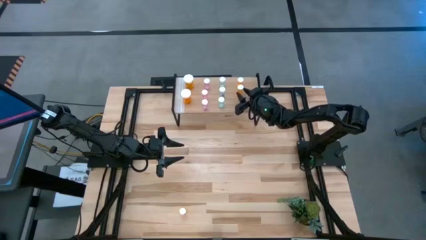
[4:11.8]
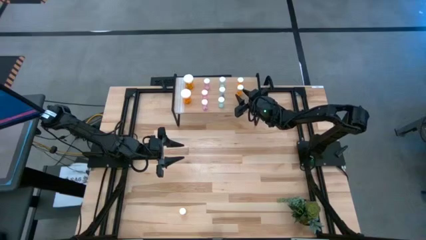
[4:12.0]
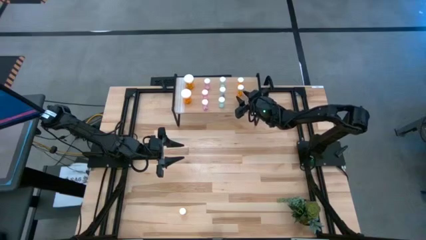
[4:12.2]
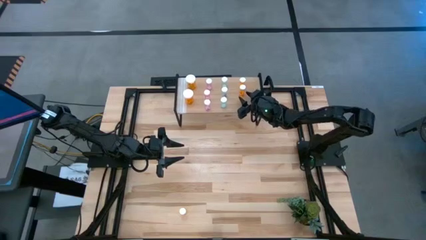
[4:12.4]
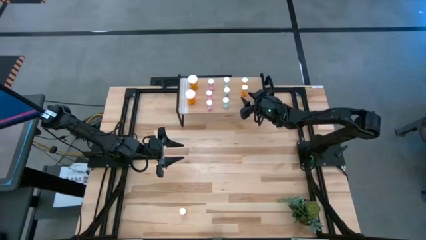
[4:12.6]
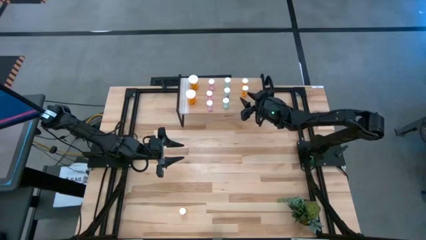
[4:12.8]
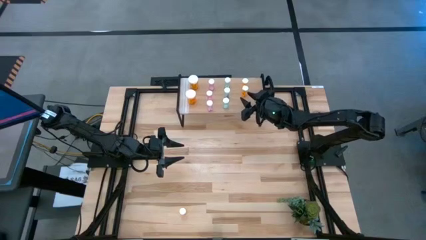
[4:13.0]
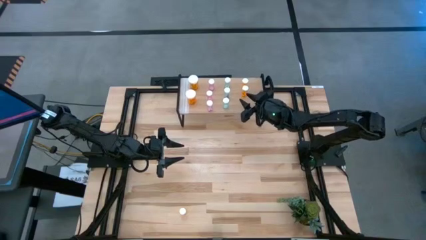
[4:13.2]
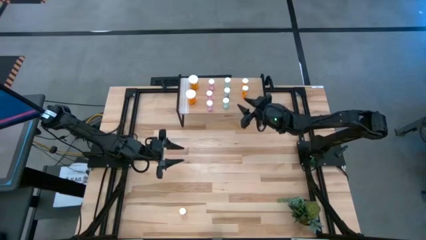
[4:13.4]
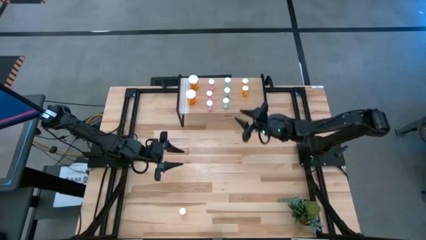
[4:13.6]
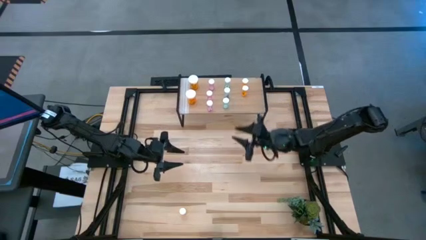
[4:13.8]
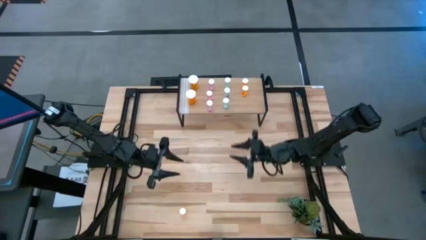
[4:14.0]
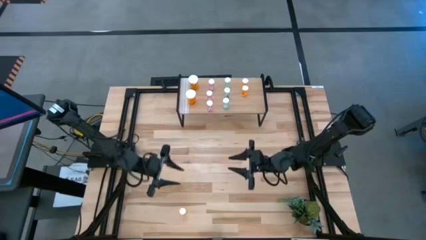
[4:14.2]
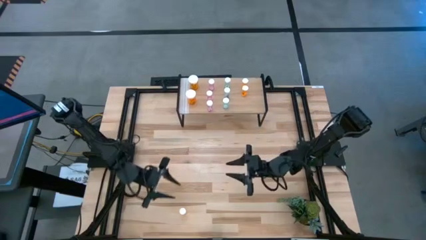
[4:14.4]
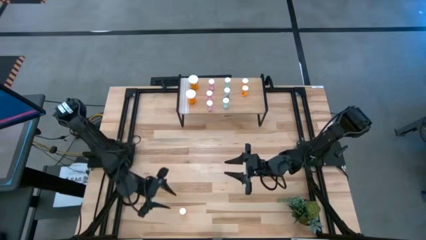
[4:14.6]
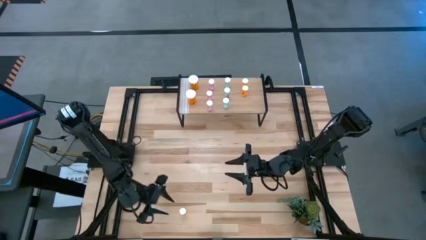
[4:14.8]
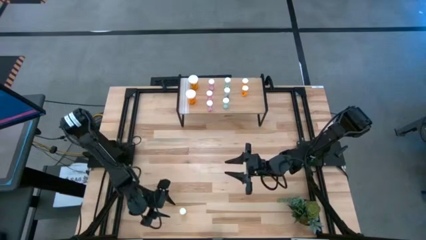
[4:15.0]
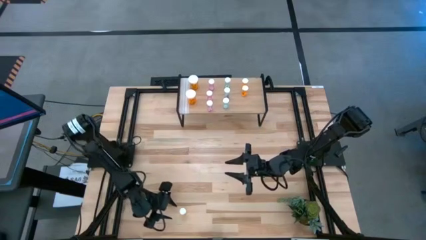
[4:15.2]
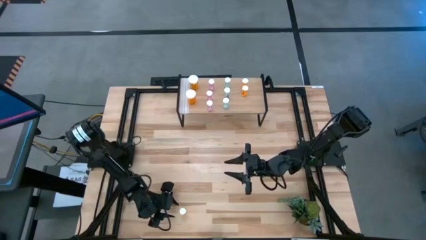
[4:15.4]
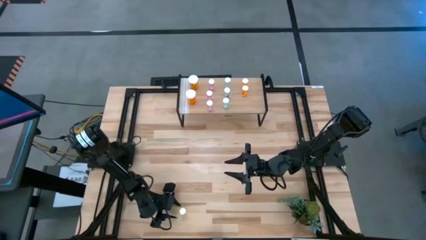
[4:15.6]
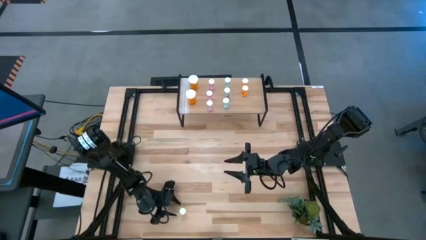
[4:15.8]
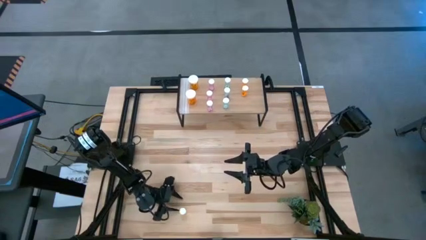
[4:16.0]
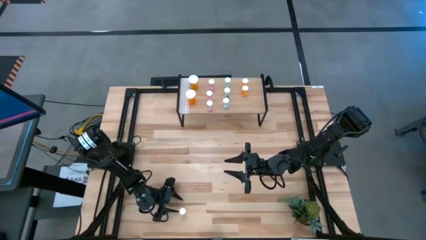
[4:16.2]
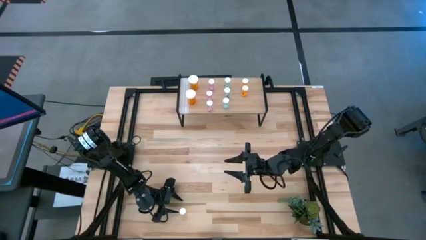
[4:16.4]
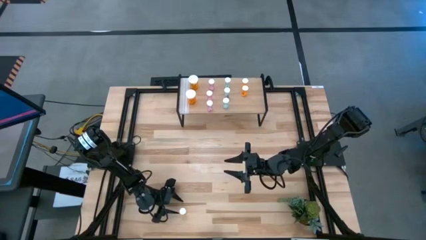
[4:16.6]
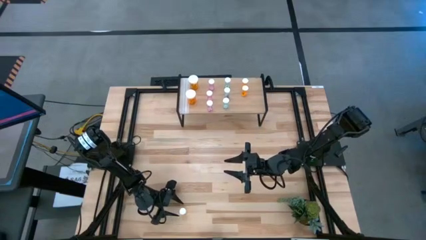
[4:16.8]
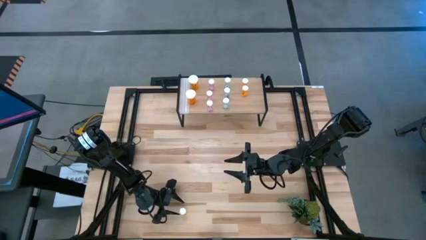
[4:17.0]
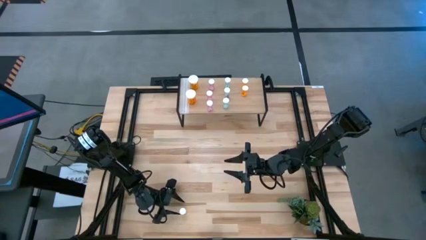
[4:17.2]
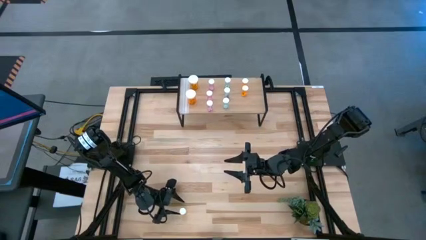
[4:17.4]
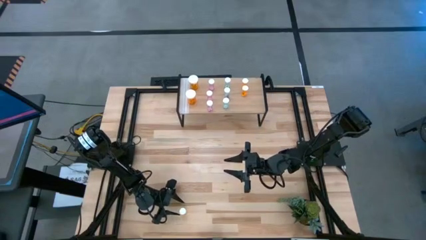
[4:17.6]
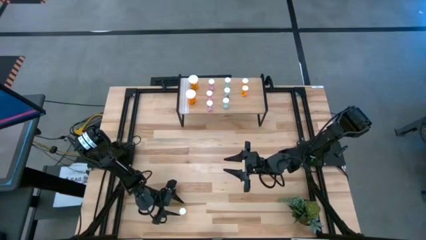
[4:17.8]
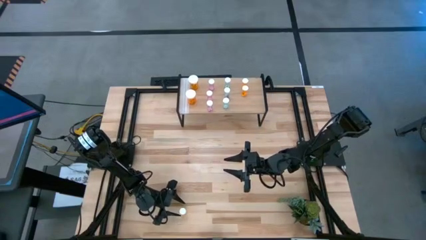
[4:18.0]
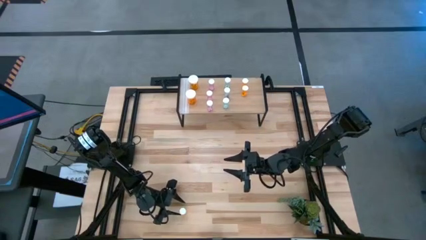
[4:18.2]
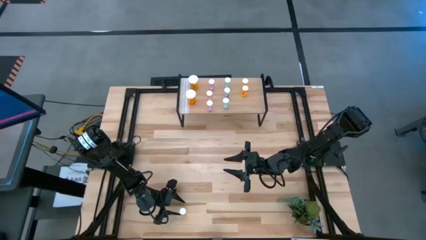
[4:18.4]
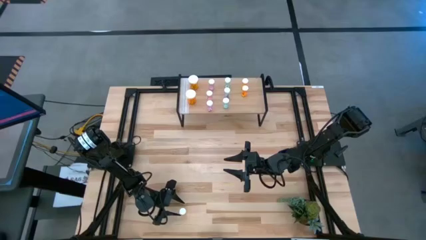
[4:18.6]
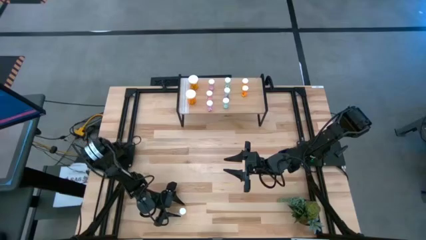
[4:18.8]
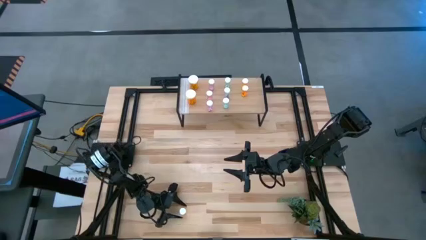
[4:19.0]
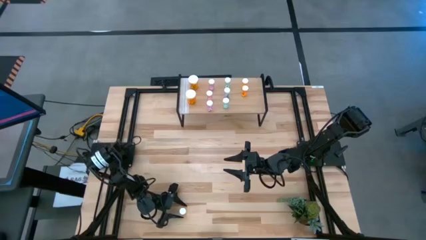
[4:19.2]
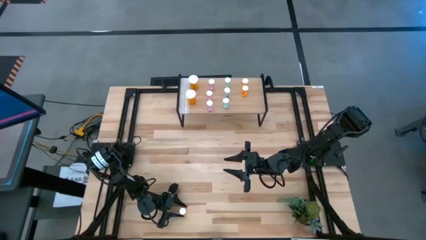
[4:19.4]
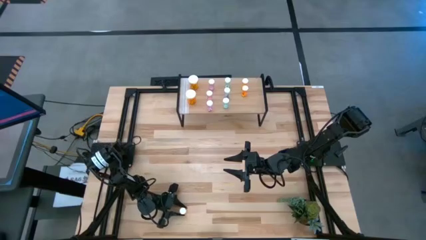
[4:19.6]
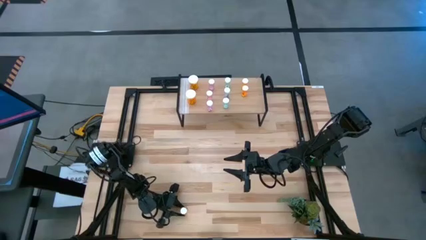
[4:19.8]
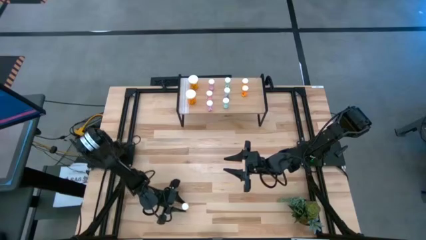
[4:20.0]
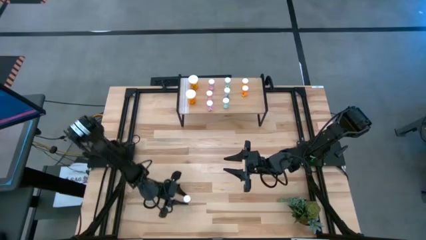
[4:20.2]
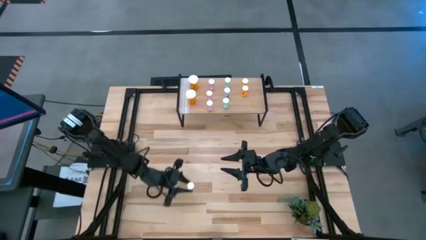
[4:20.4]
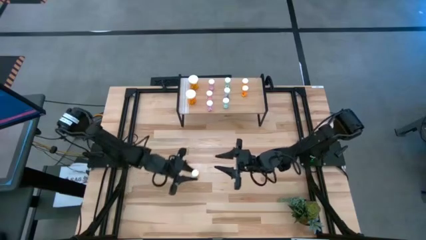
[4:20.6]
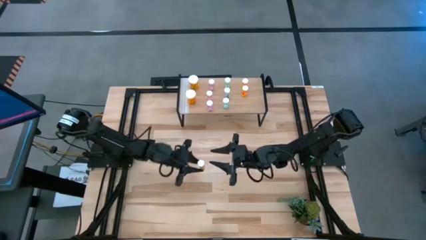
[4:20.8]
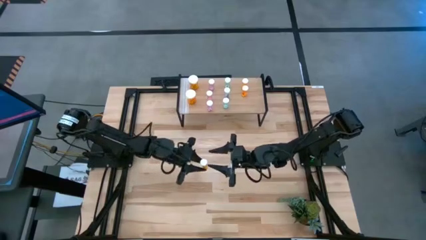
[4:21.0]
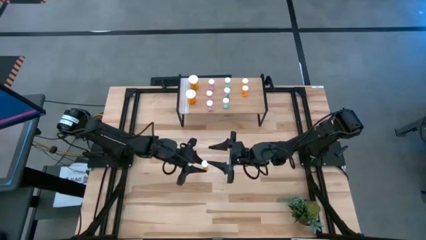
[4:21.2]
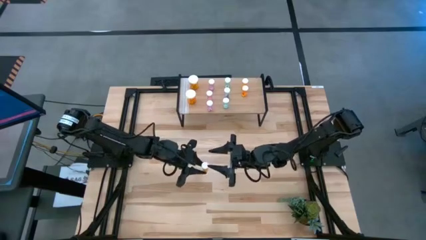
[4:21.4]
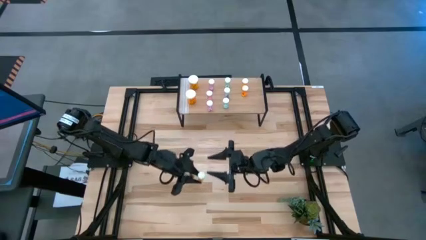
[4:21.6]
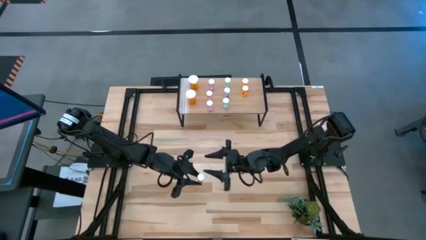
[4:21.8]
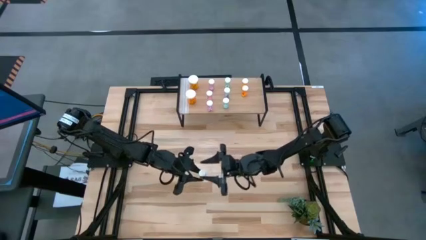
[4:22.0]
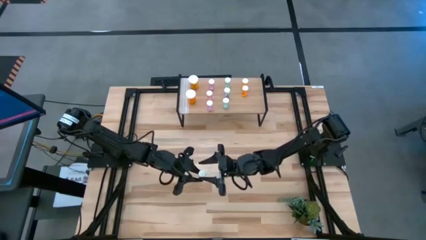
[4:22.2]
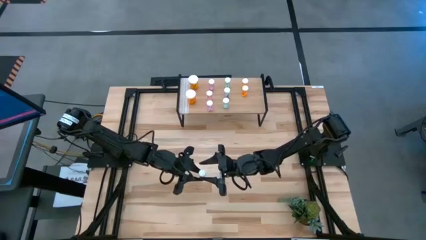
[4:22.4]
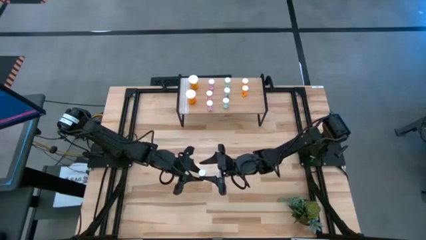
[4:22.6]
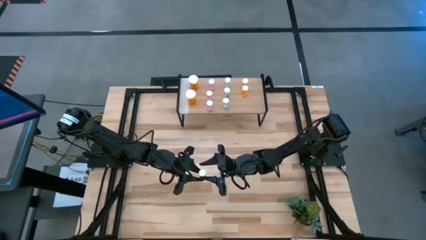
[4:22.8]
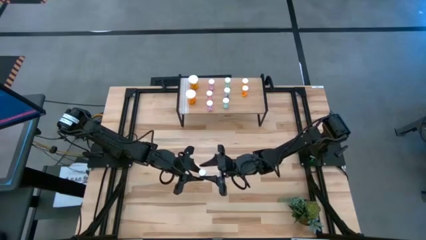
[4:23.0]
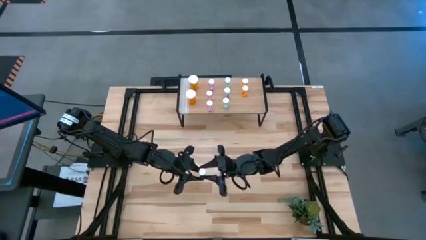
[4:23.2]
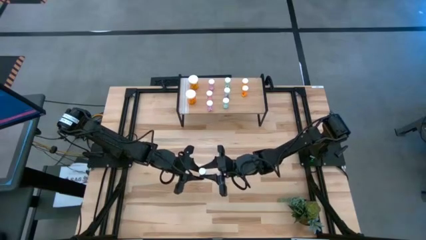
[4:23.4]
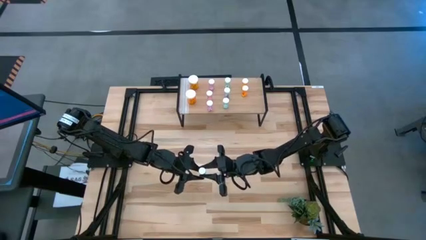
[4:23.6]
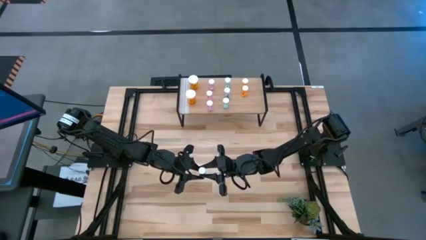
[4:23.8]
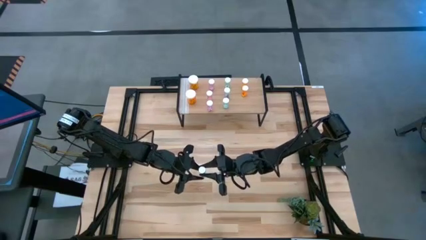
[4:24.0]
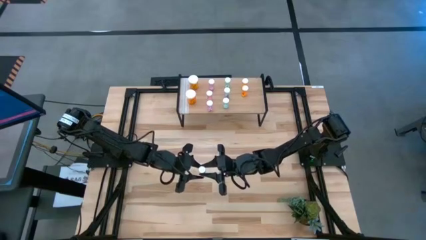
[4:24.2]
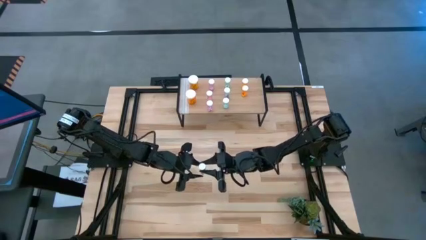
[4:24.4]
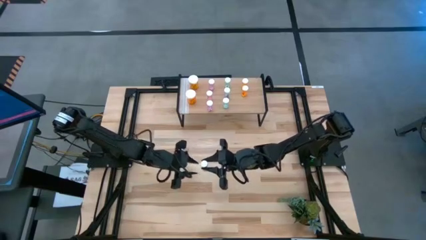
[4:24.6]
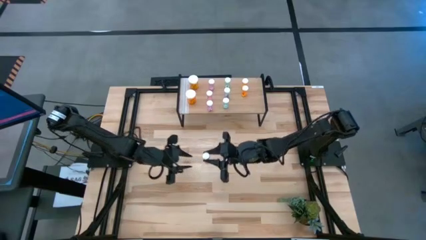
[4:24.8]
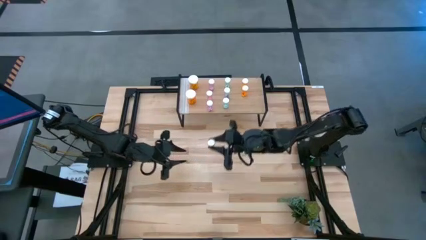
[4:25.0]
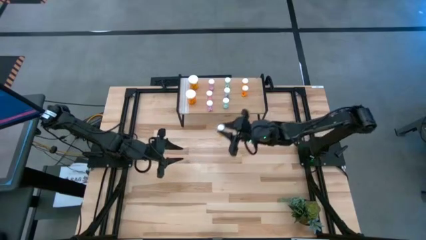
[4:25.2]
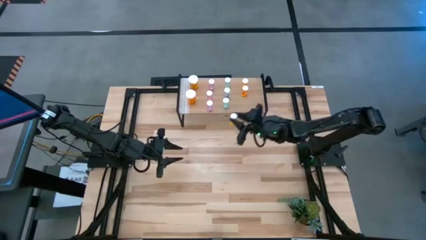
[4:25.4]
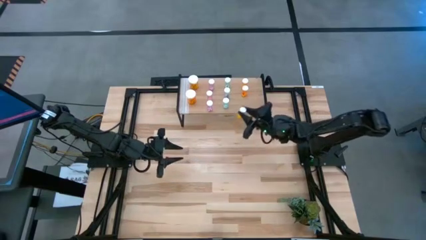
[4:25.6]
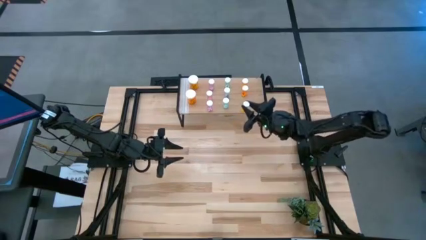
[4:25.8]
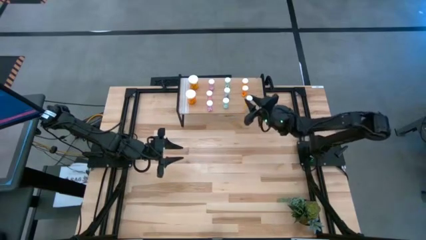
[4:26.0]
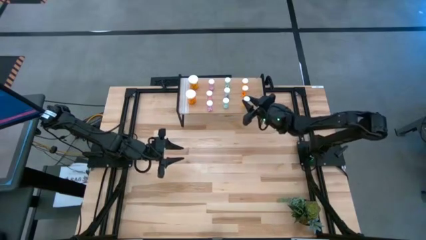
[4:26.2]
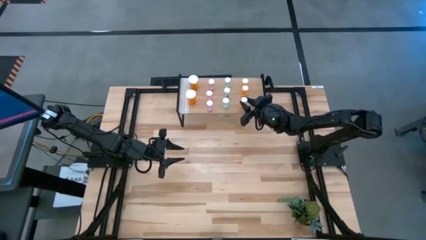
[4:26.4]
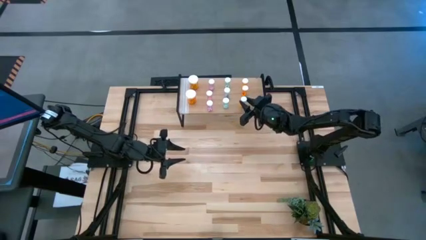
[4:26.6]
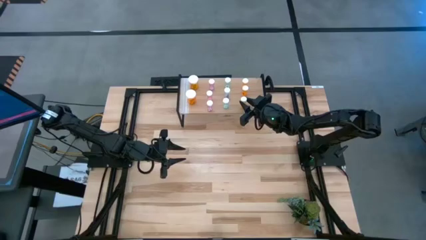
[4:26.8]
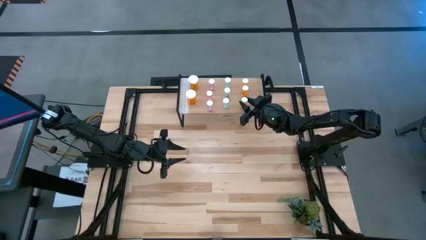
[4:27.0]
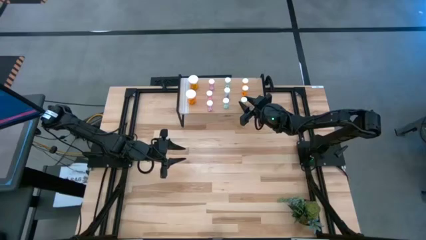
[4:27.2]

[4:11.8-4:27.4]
Task: Pick and place medicine bottles onto shelf by color
Put the small orange pill bottle aligned with the other small orange pill bottles on the shelf

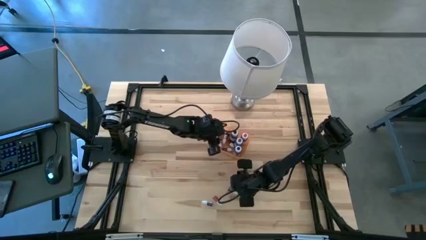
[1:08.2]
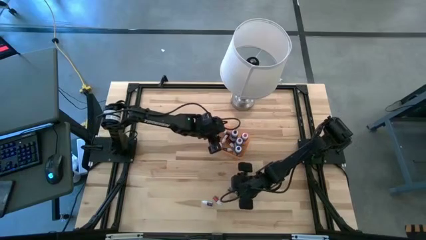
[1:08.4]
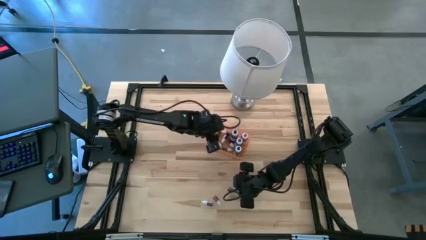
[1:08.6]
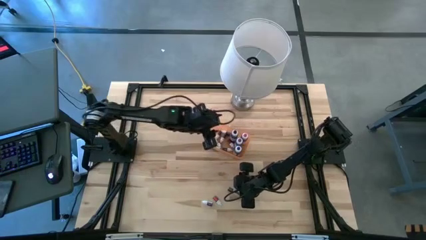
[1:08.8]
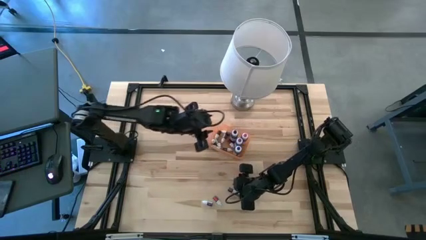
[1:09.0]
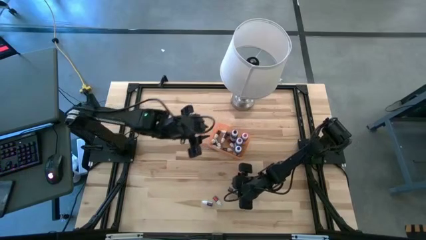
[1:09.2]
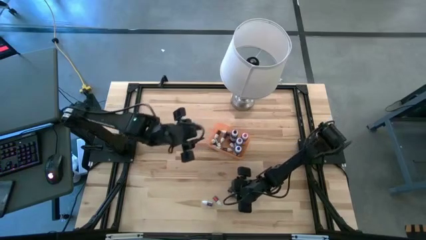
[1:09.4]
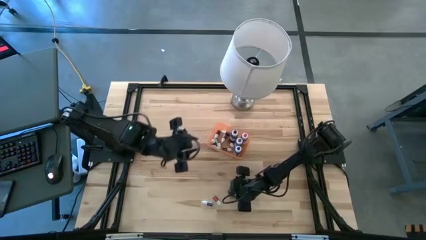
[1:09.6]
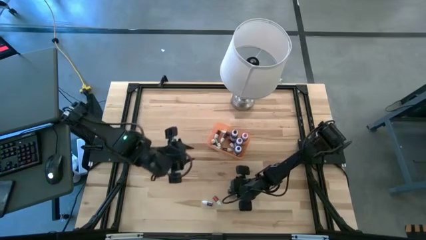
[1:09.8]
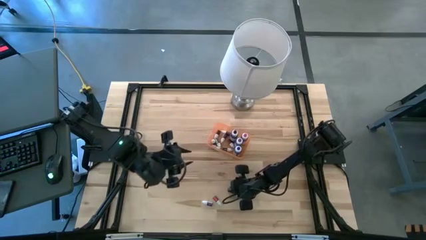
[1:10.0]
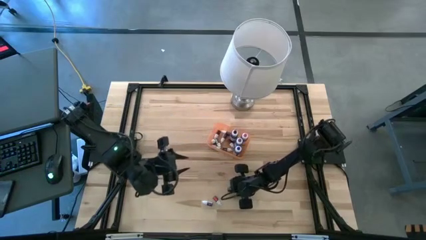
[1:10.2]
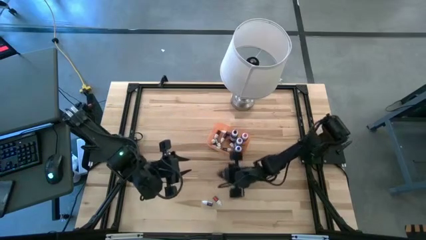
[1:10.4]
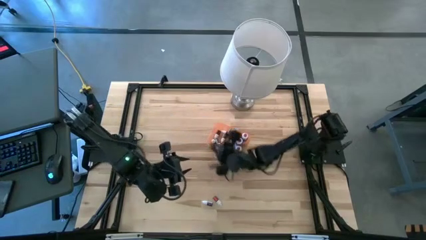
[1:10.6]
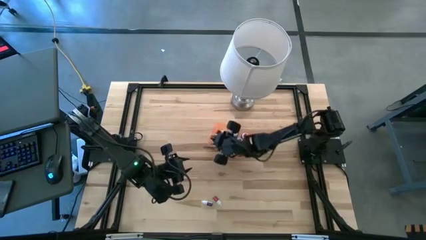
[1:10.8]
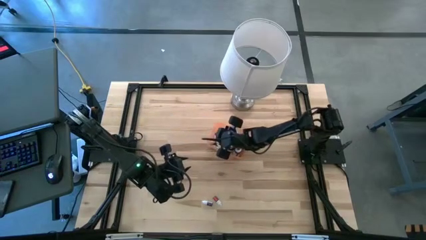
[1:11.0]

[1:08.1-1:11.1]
Task: Pick & Place food coloring
Put the small black food coloring bottle into the orange bin
